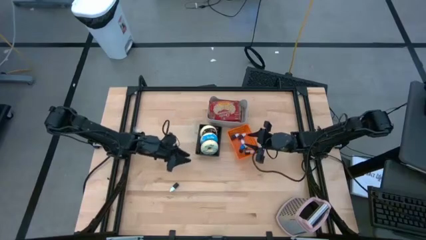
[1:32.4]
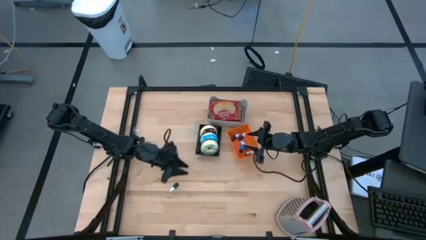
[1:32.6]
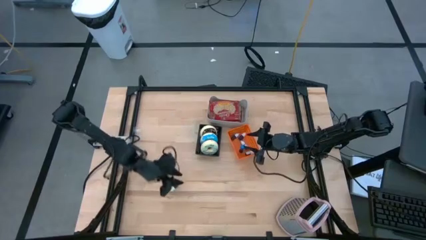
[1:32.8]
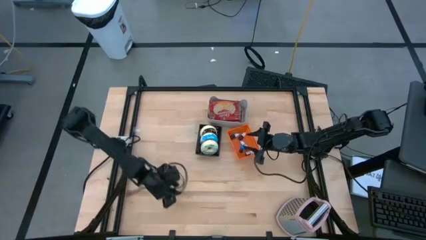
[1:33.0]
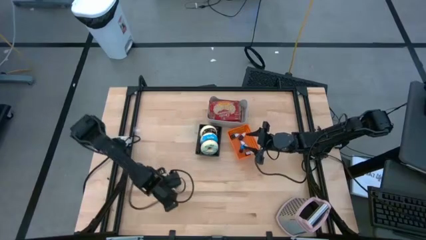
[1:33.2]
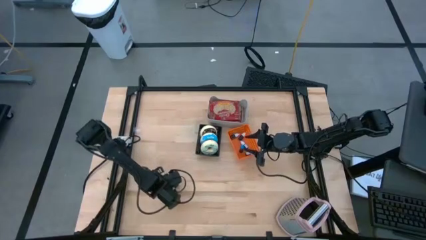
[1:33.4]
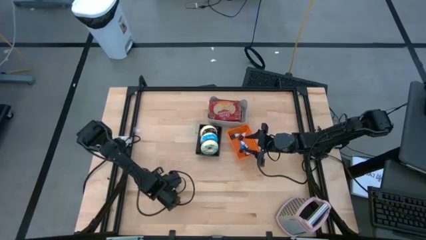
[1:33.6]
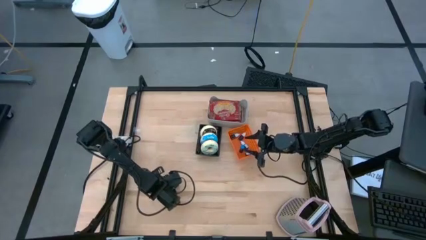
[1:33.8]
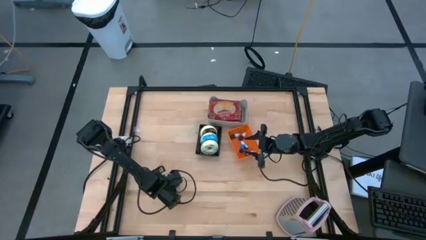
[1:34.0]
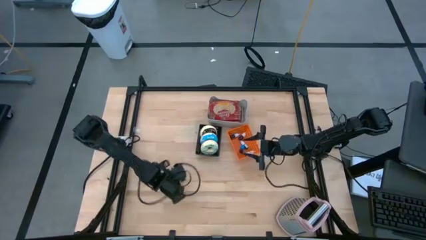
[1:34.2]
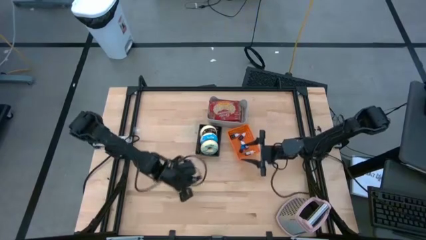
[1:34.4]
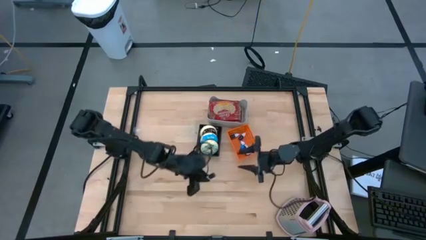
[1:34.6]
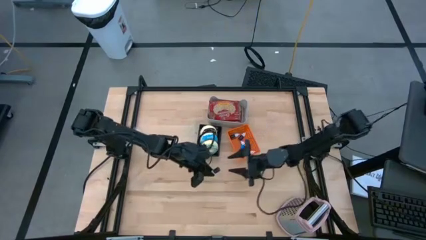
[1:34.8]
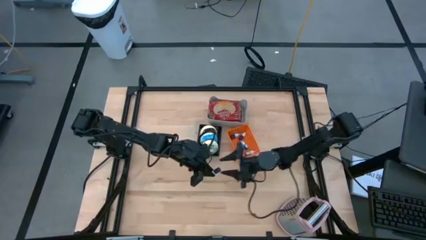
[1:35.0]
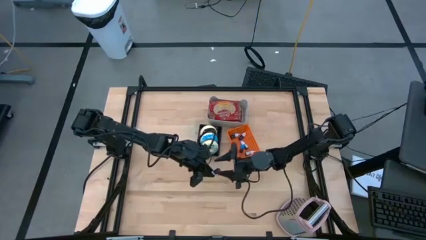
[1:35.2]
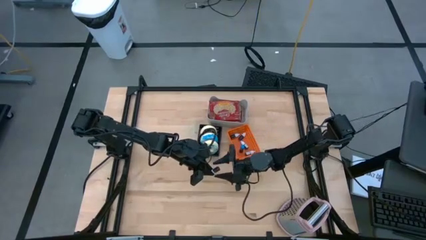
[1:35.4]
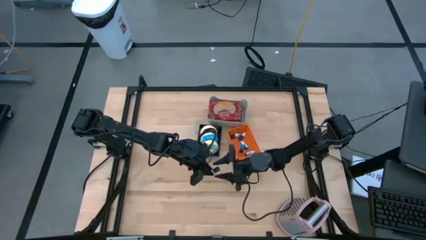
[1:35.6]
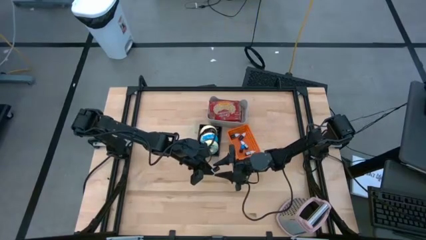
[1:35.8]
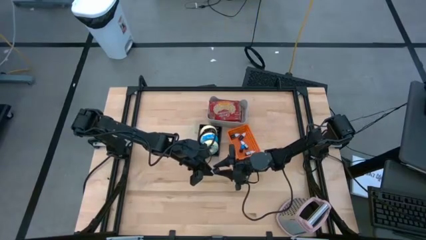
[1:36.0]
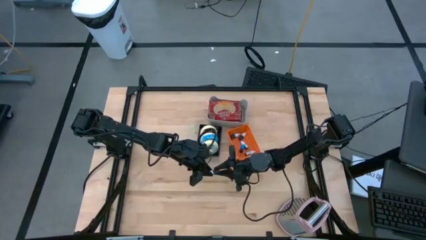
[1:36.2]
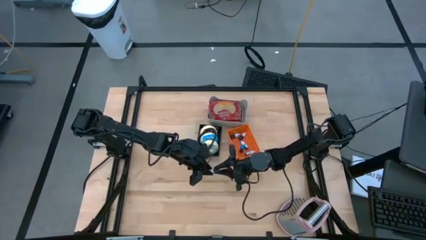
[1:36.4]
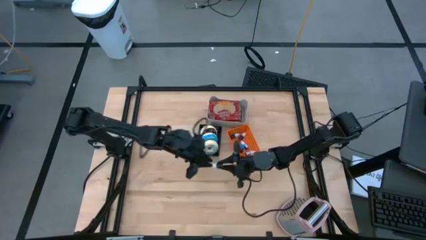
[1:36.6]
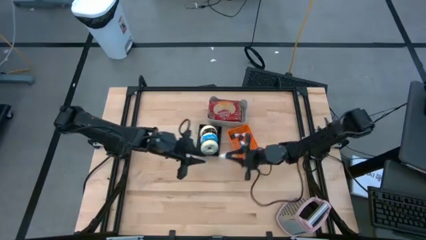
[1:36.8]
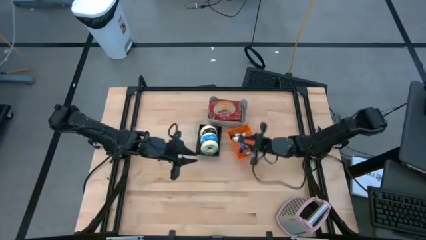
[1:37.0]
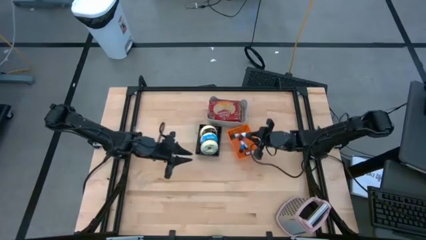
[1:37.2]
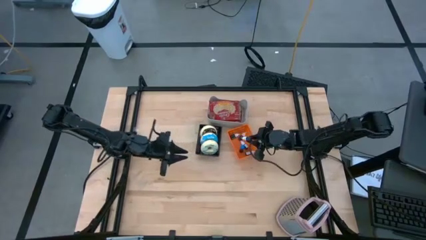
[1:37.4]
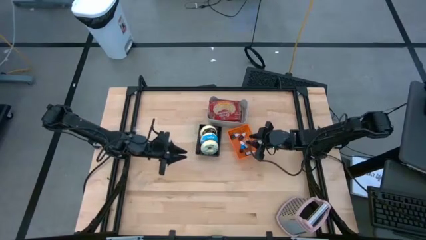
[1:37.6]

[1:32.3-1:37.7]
Put the brown food coloring into the orange bin

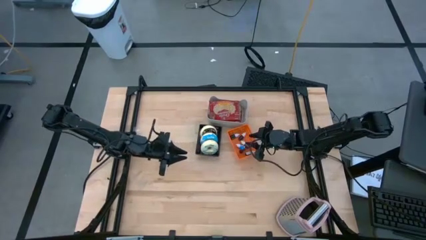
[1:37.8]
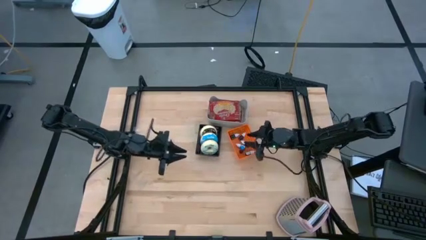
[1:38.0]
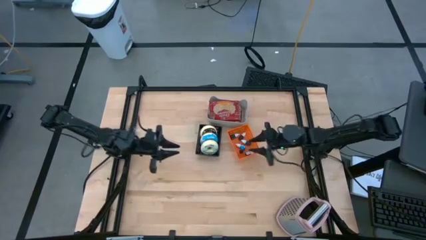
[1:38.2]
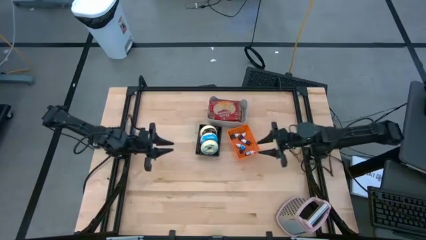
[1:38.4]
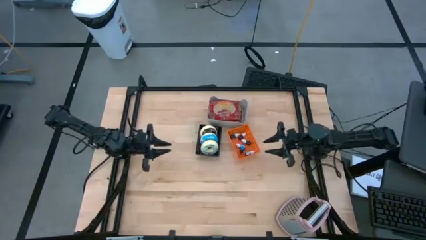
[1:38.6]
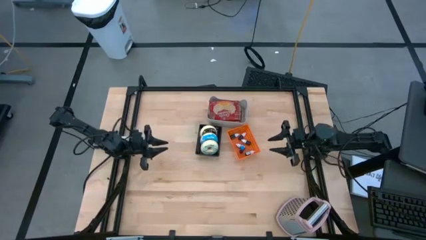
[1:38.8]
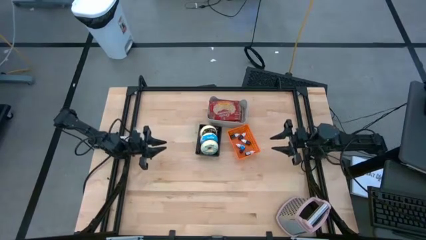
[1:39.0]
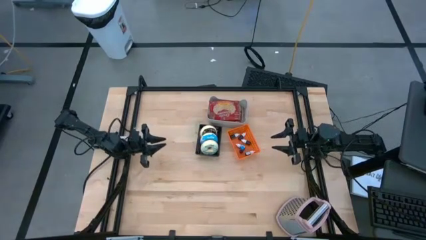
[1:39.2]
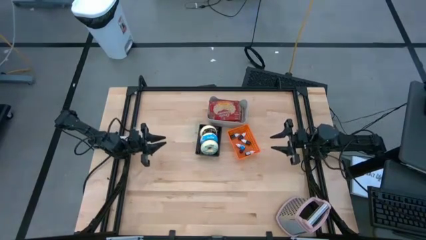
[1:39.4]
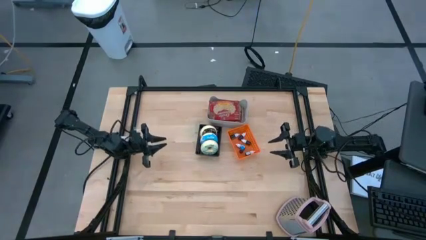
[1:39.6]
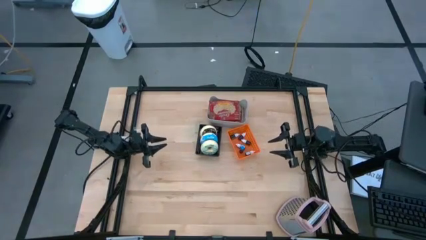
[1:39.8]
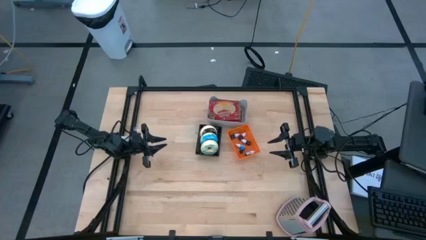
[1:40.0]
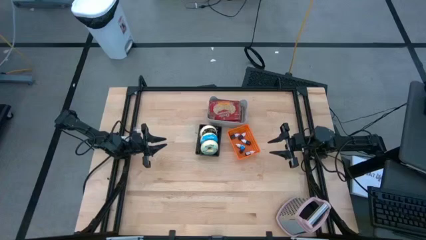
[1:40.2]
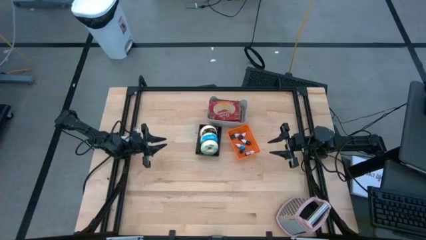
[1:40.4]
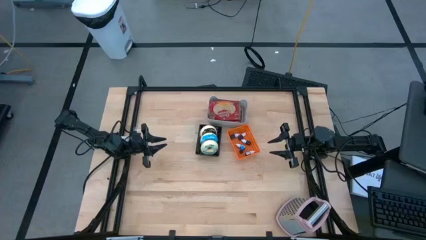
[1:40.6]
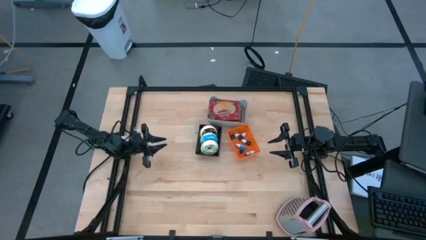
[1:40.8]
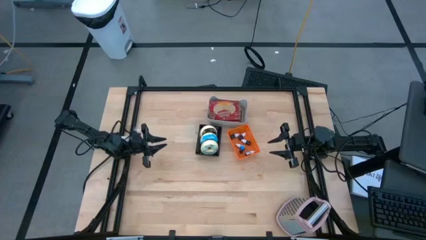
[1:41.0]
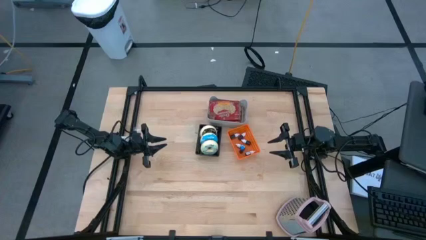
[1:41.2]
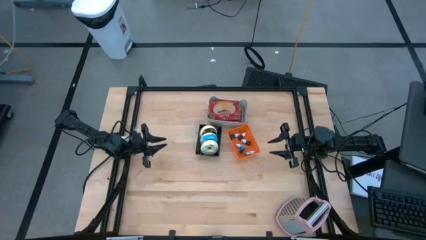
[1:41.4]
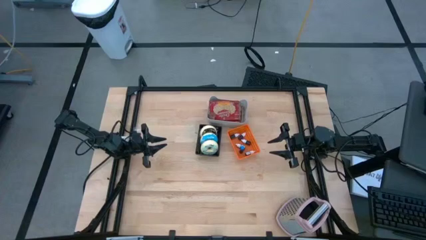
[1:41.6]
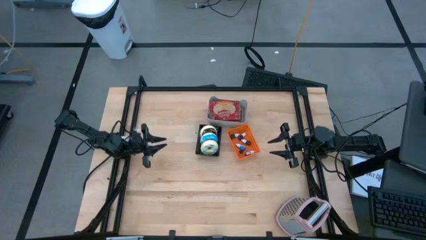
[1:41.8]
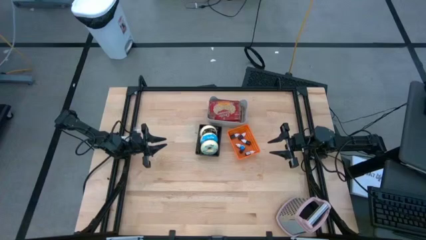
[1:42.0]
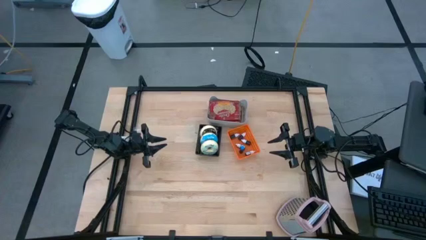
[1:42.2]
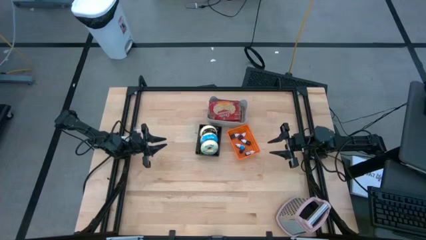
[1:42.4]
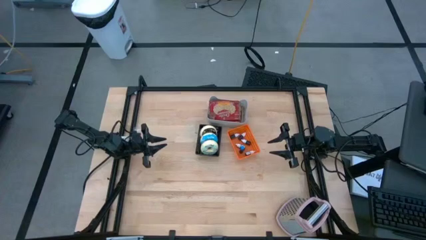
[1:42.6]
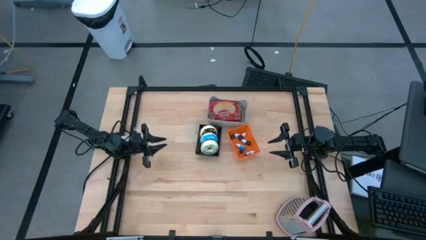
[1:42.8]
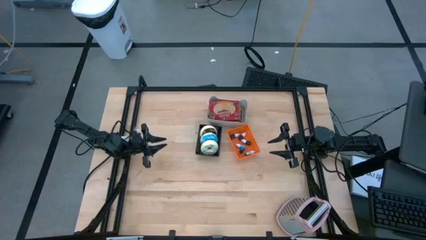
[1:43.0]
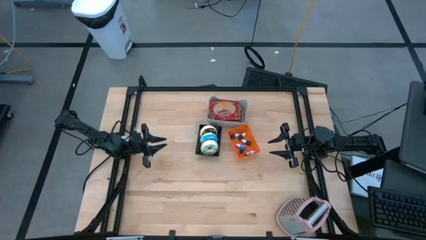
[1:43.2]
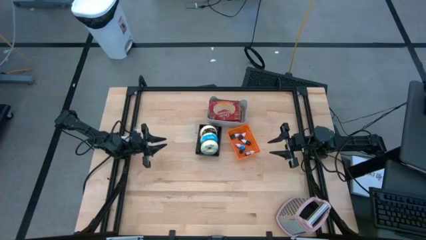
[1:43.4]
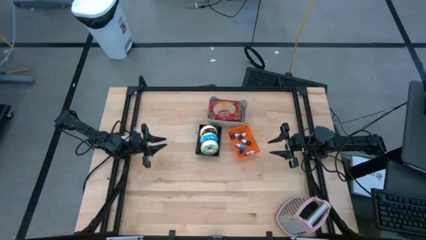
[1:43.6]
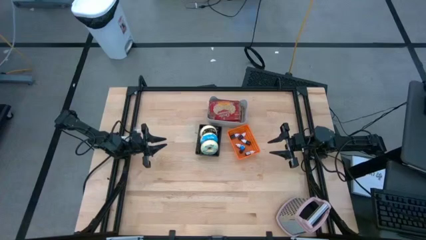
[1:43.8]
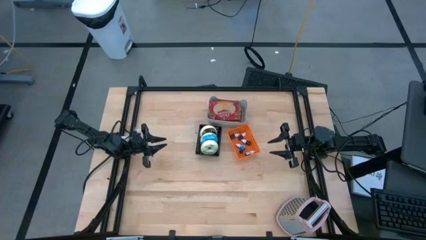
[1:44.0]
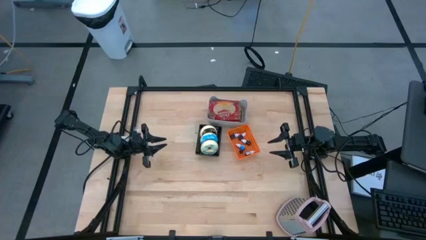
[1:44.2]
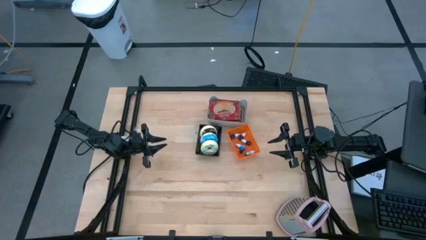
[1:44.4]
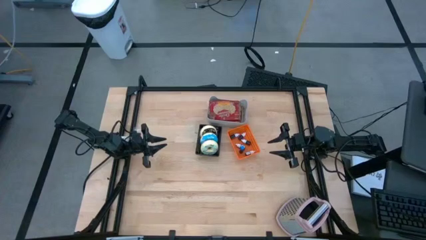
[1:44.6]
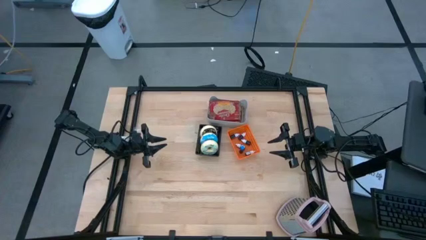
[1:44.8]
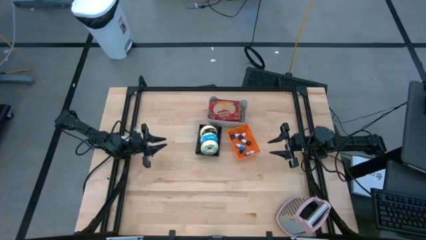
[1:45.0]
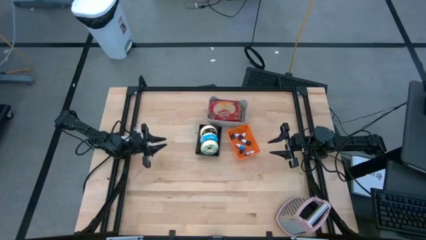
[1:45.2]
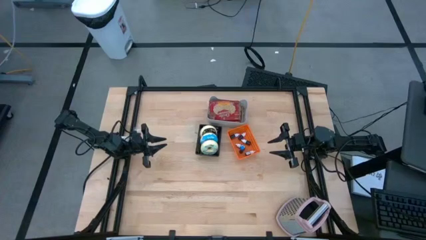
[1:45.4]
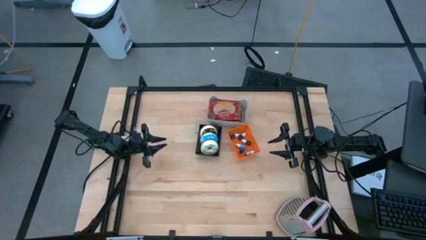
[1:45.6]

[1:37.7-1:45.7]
Return to Home Position

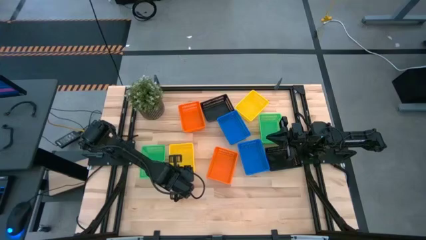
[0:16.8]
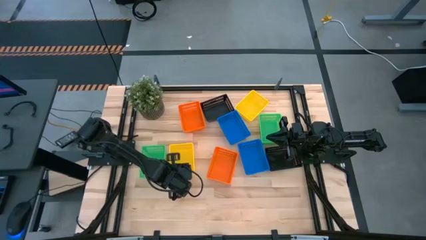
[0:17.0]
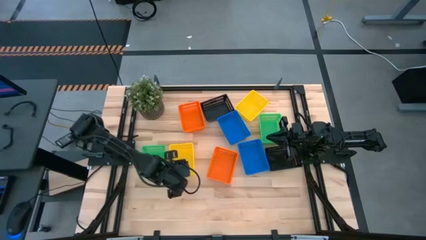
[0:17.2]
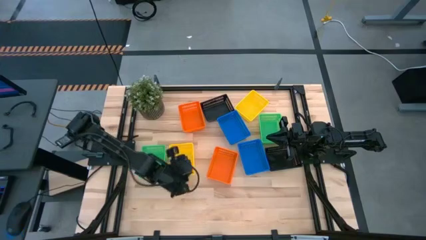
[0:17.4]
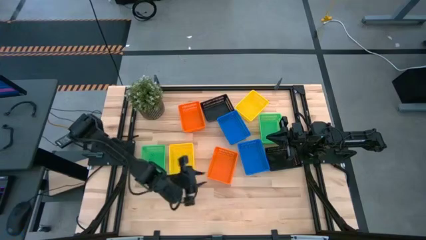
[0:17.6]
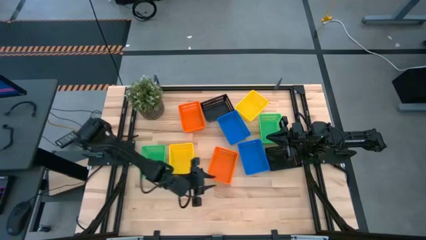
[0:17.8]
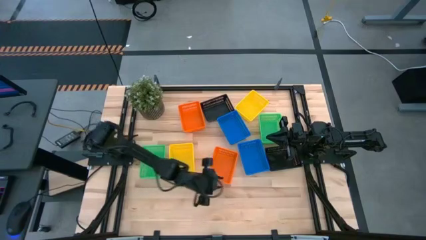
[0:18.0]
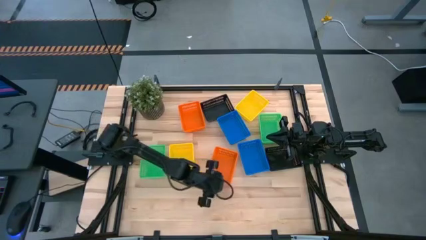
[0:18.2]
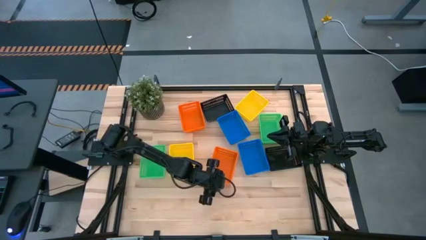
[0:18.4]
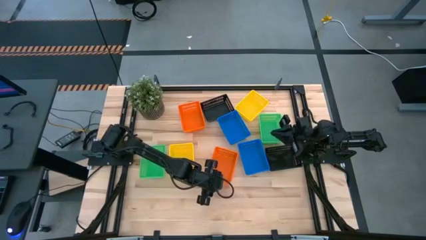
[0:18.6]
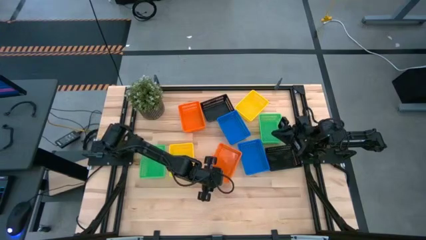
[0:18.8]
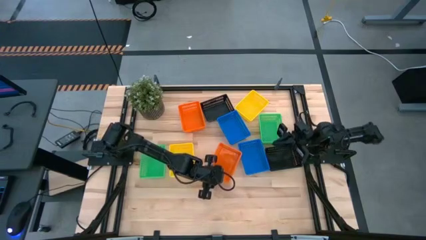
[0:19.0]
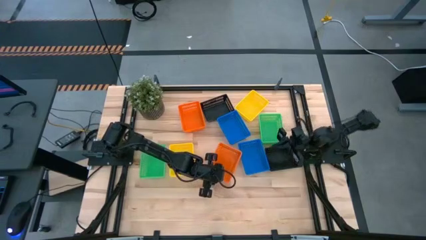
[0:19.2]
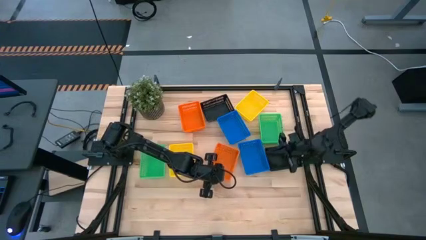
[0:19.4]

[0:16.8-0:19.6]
Adjust the bottom orange bin

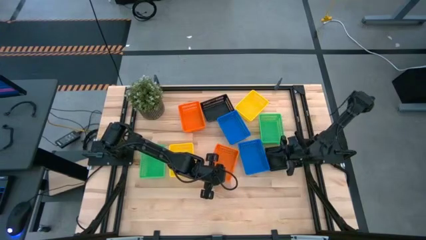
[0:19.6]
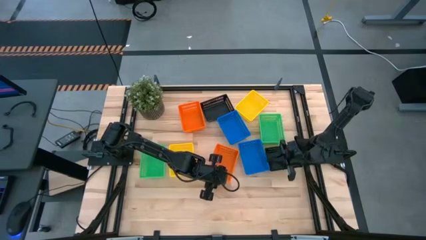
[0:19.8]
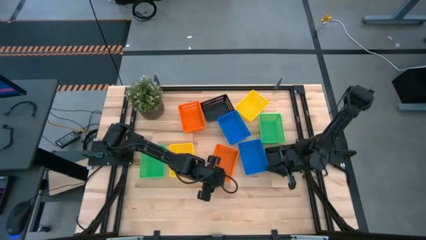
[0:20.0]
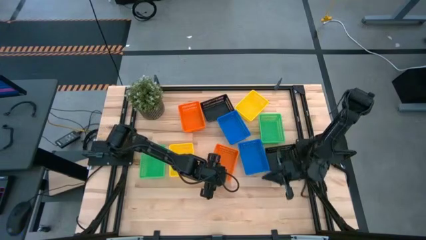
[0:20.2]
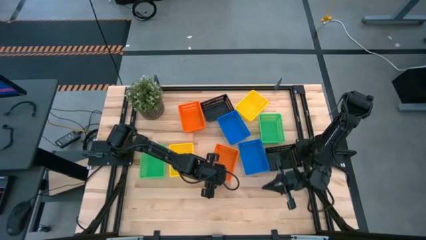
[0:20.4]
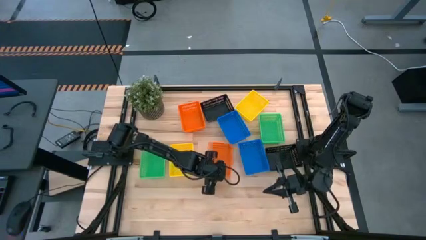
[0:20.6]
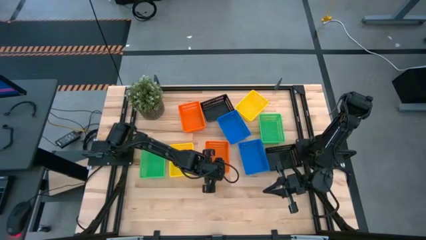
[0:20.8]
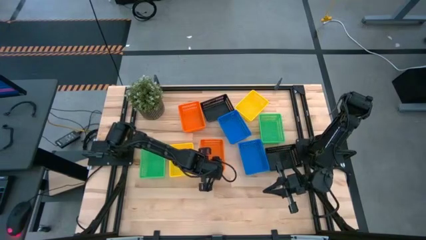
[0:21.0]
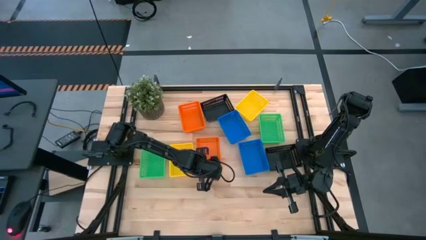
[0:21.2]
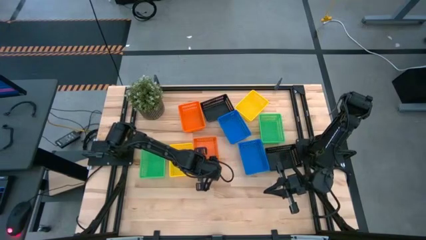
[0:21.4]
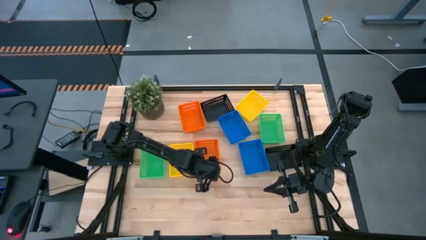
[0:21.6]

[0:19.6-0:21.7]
Adjust the bottom orange bin
